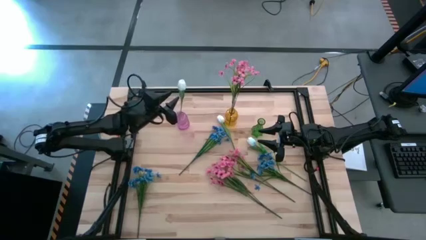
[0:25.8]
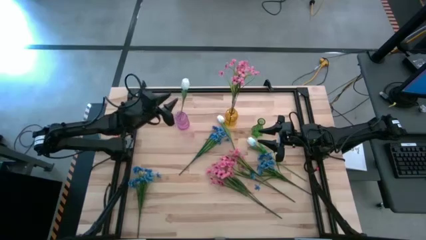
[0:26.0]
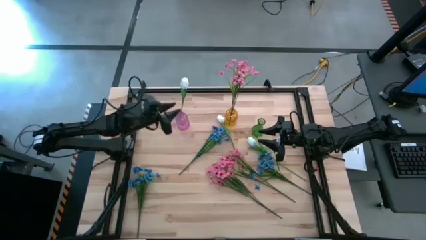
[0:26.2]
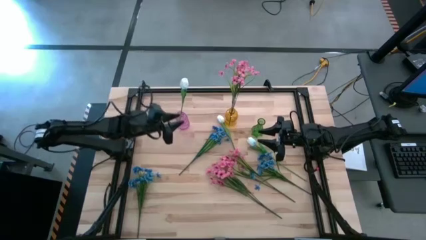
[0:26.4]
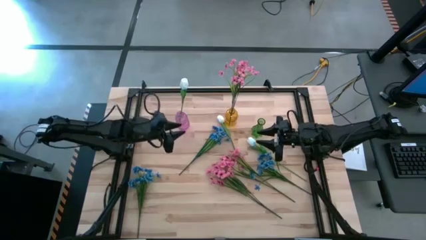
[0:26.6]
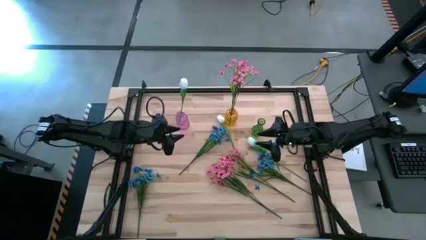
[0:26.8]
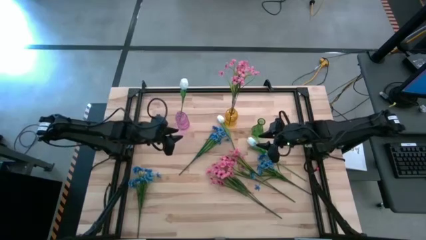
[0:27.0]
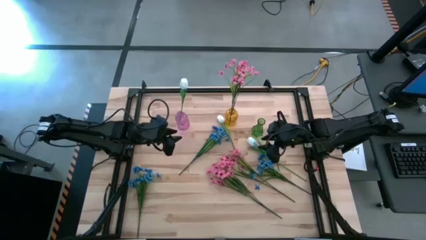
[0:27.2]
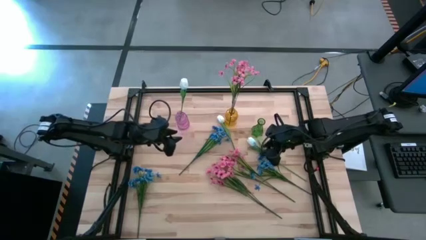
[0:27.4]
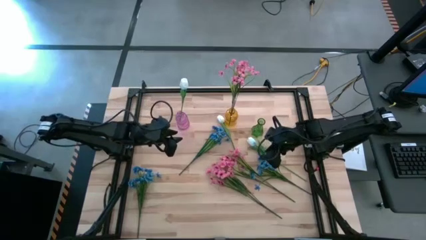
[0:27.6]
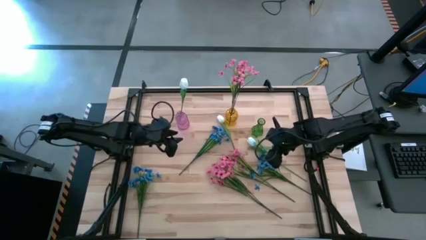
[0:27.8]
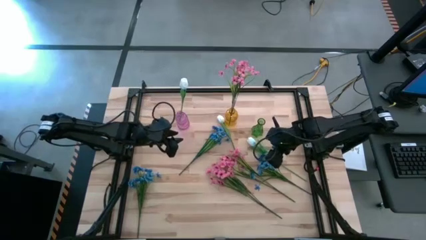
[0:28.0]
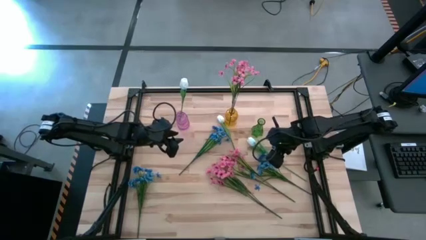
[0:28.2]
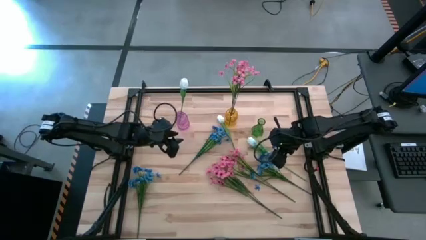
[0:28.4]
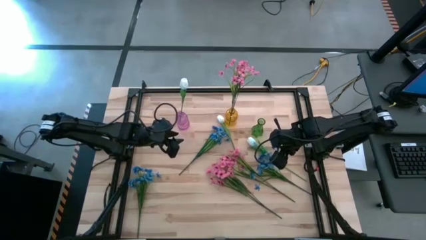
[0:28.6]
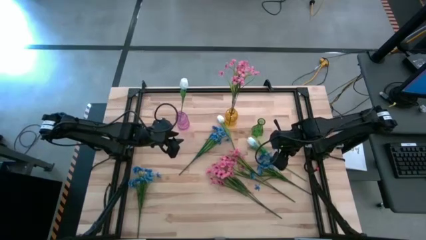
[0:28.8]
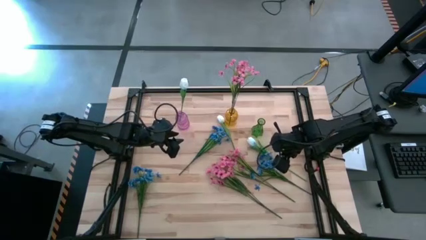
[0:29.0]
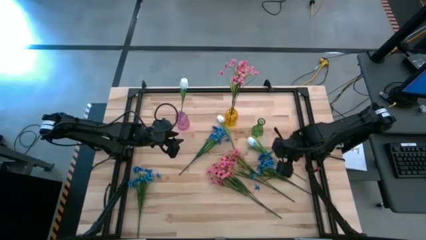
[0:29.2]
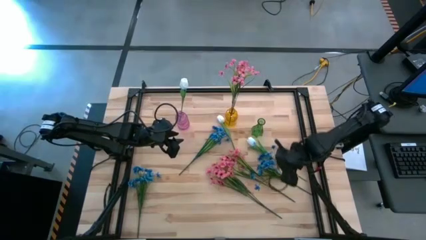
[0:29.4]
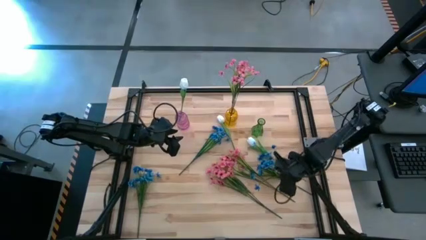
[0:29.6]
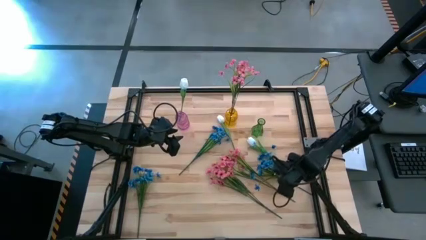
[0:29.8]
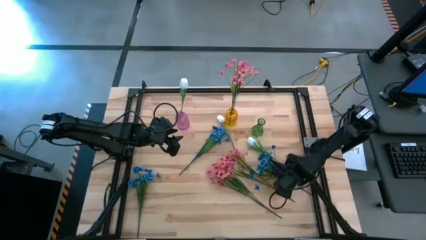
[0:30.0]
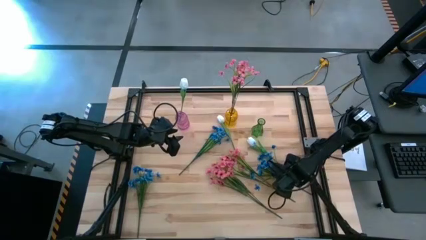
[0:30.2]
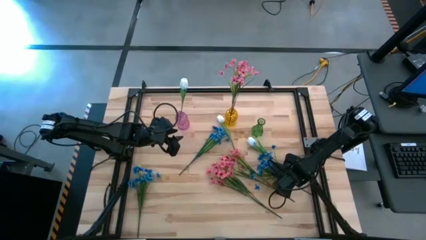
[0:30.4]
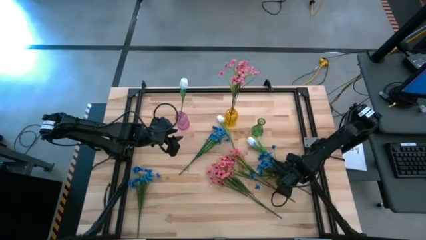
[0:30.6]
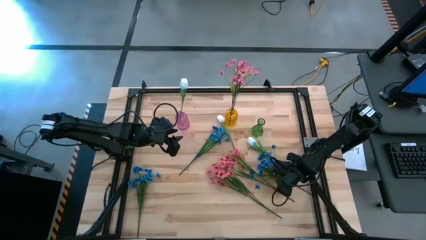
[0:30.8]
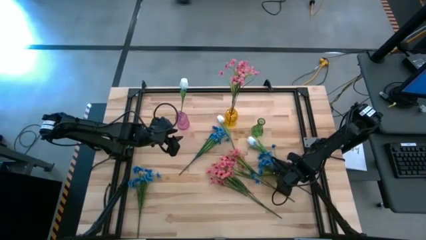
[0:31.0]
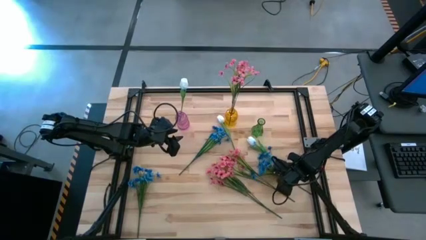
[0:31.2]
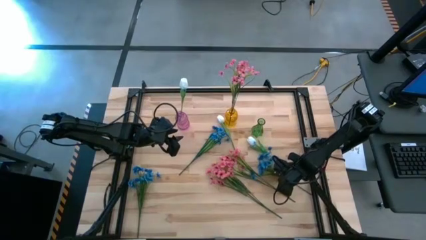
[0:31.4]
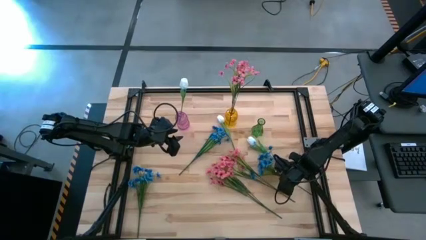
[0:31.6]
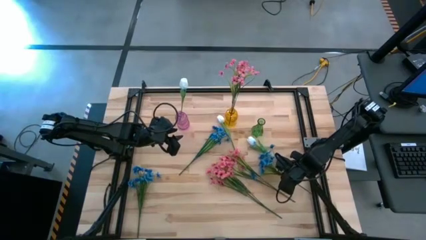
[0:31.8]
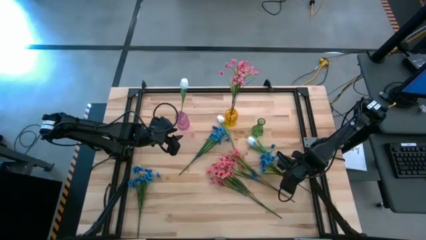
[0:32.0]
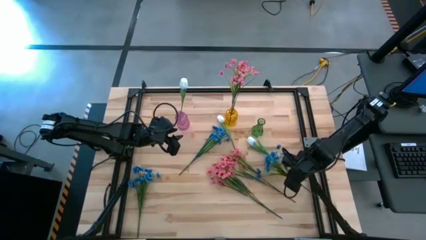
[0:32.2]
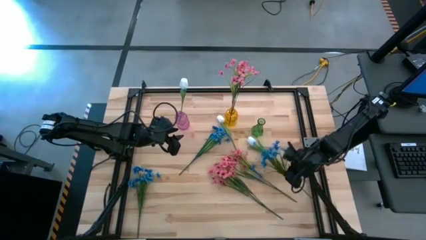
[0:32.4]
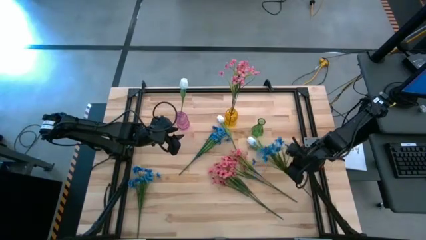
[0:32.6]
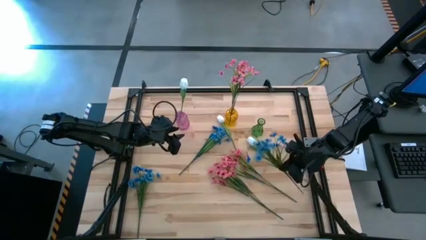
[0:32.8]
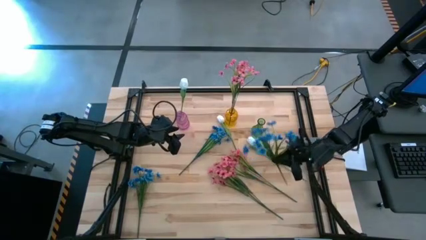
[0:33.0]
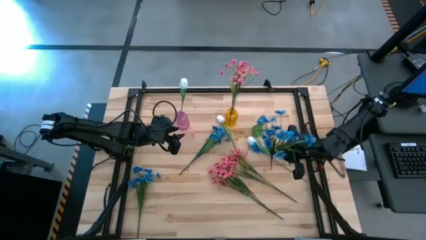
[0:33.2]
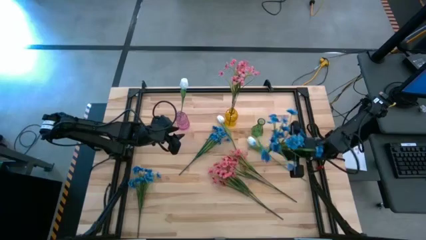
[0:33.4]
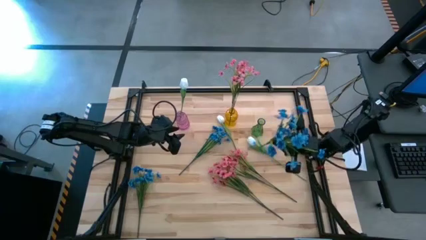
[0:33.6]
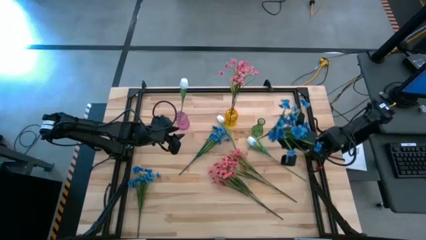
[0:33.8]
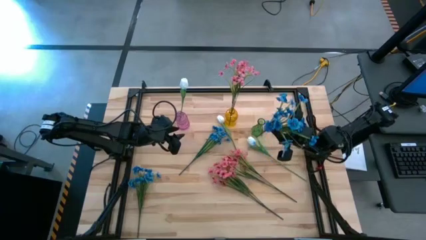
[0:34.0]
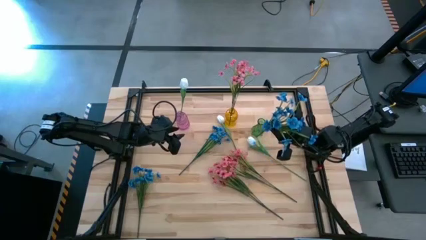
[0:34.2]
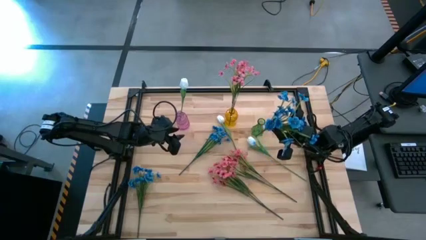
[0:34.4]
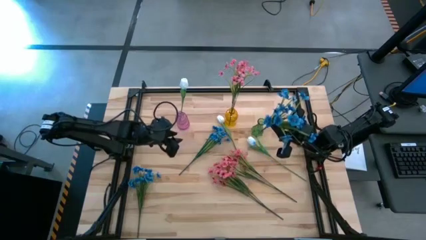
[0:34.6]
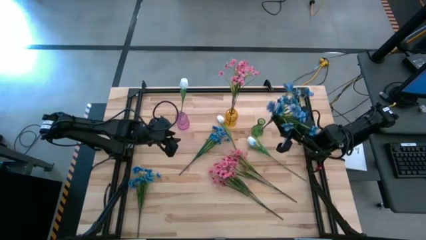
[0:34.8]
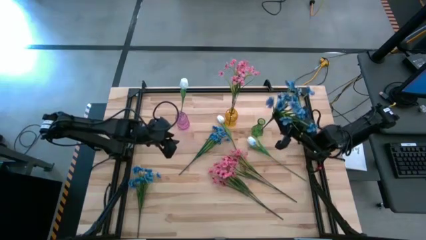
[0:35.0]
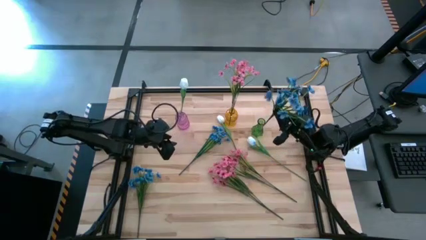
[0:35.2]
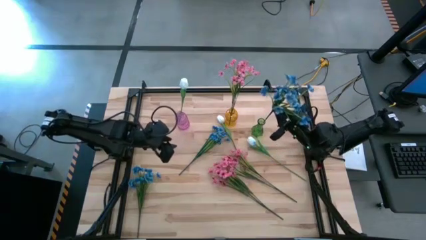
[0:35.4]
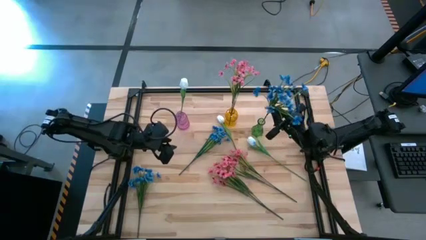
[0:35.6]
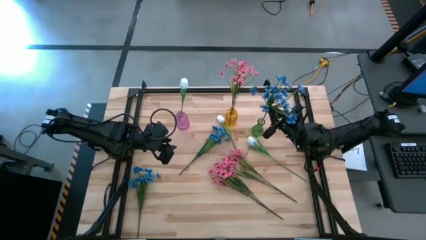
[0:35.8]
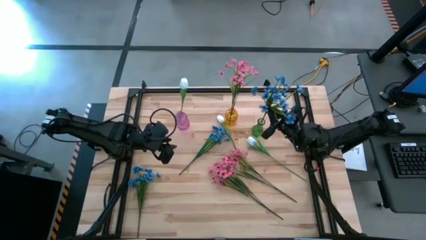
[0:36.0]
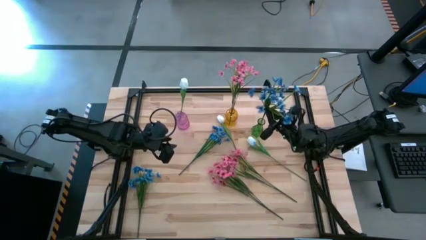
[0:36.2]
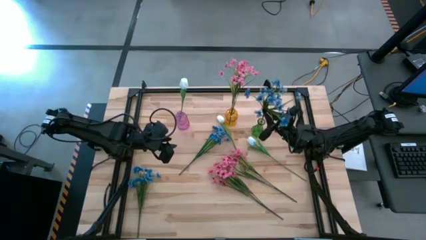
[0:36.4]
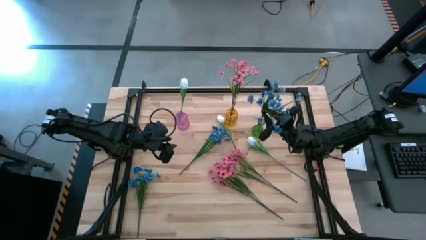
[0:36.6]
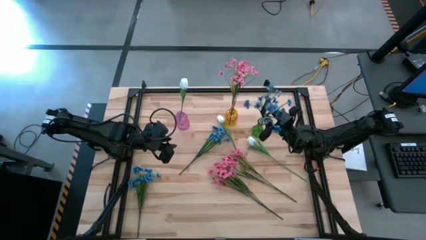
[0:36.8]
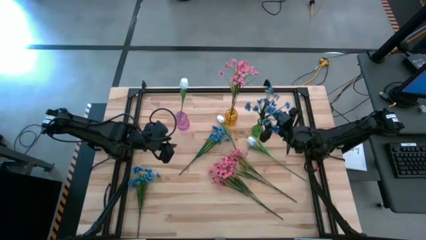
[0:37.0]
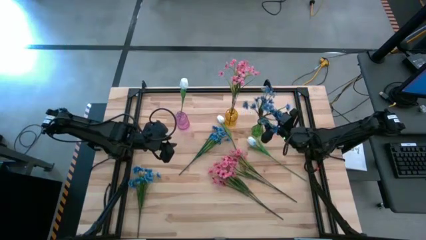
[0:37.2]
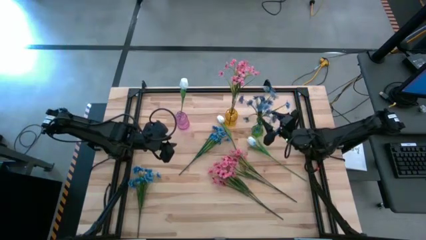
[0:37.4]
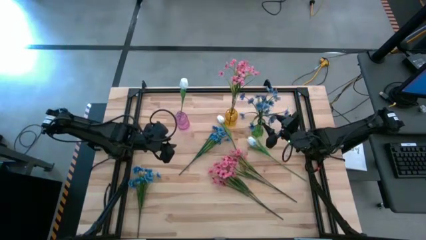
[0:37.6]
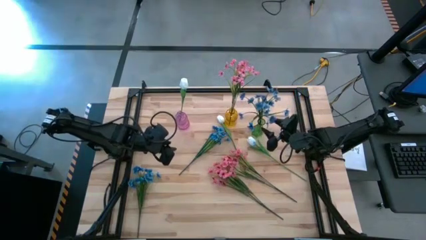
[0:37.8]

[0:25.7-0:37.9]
Task: Sort flowers into vase by color
Put the middle right blue flowers into the green vase
